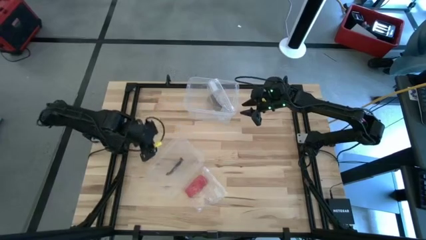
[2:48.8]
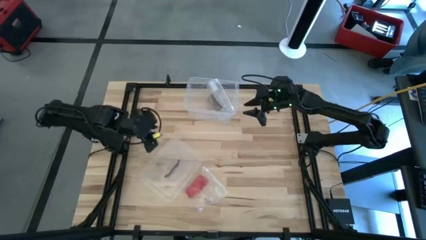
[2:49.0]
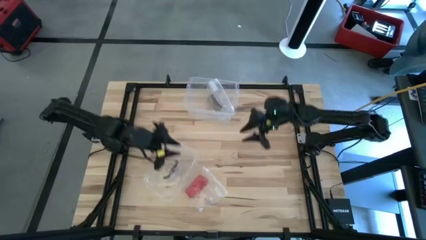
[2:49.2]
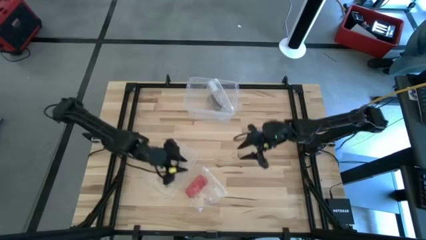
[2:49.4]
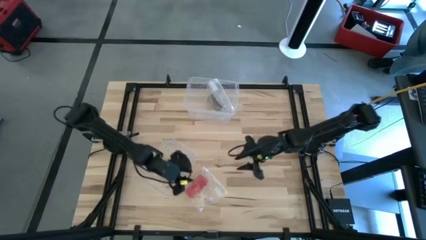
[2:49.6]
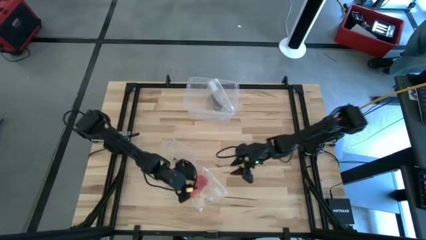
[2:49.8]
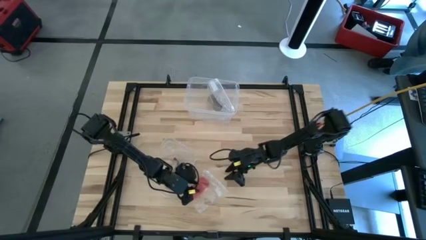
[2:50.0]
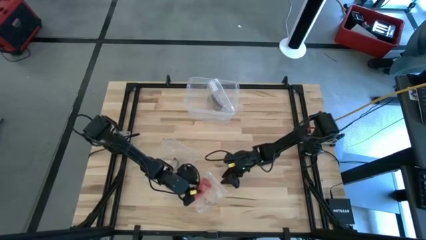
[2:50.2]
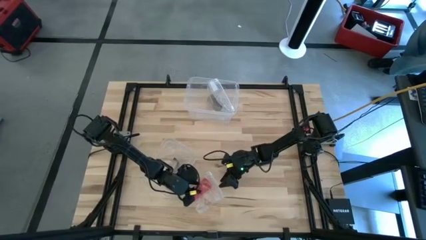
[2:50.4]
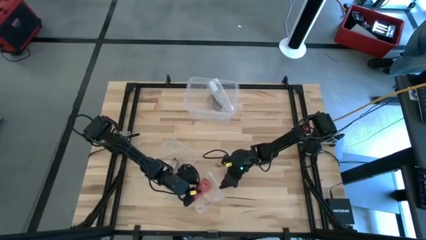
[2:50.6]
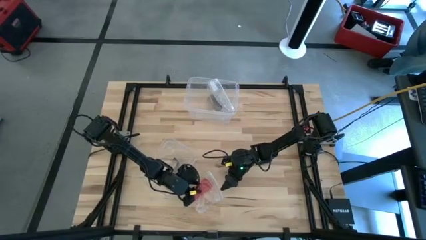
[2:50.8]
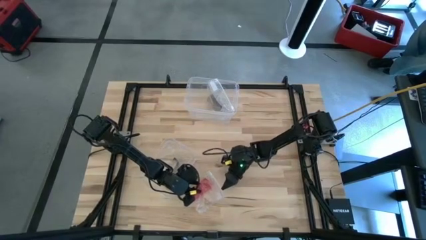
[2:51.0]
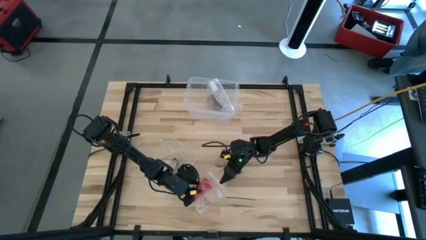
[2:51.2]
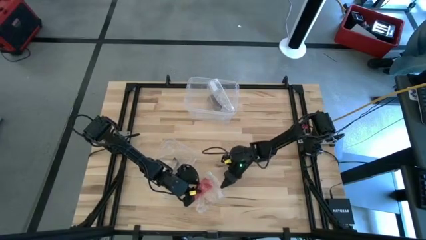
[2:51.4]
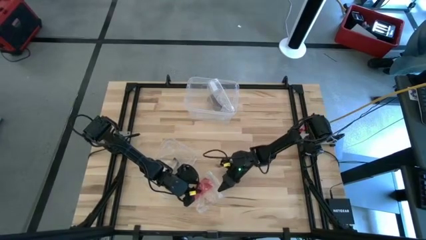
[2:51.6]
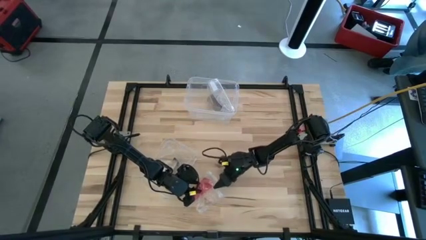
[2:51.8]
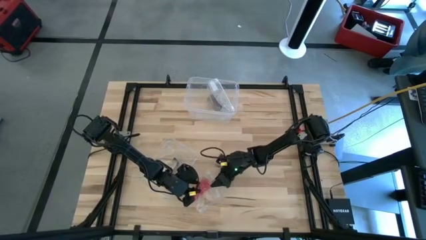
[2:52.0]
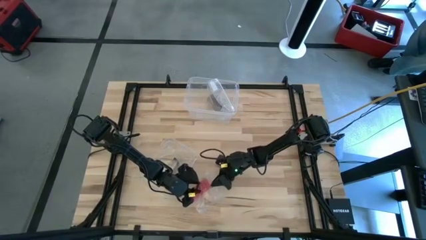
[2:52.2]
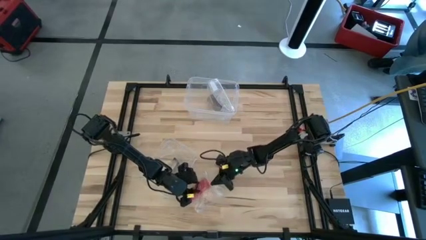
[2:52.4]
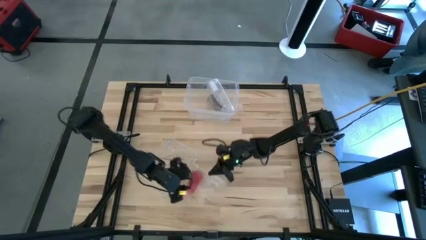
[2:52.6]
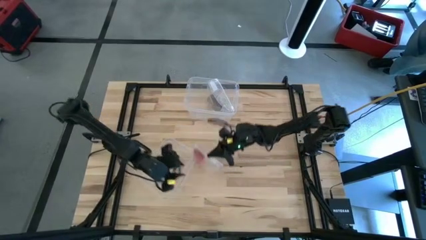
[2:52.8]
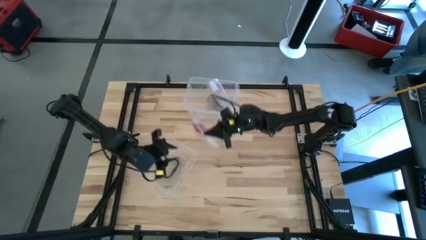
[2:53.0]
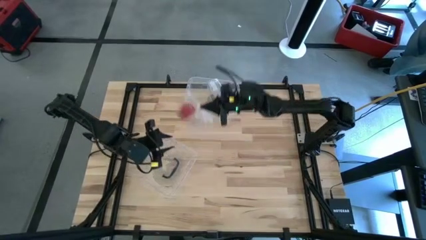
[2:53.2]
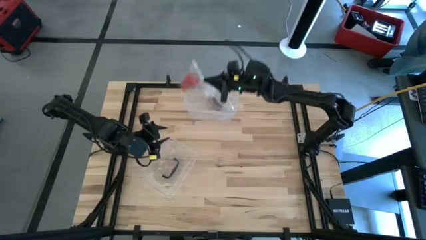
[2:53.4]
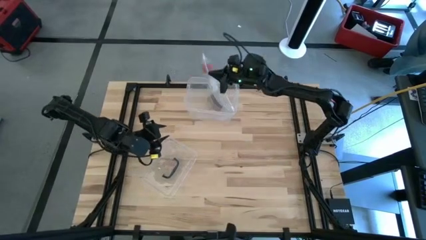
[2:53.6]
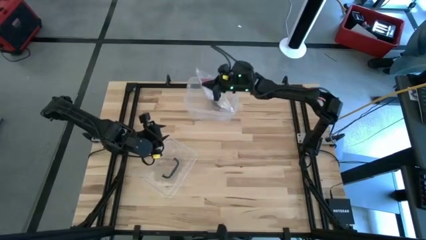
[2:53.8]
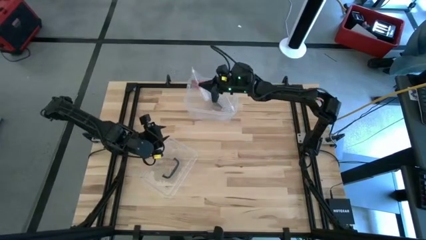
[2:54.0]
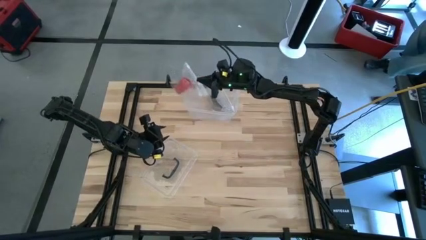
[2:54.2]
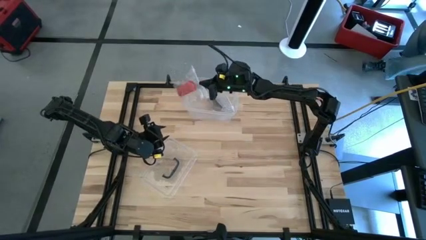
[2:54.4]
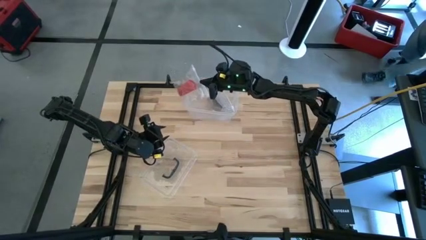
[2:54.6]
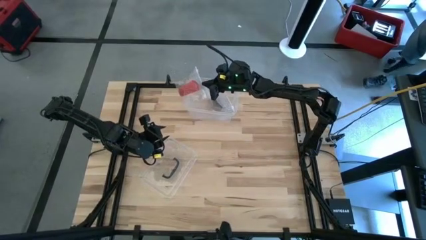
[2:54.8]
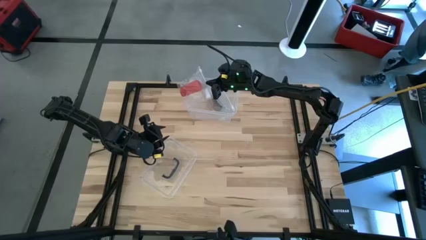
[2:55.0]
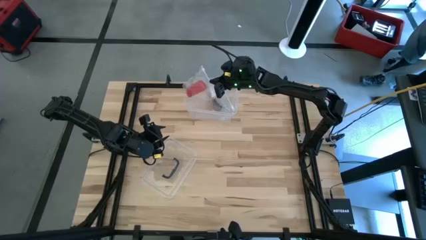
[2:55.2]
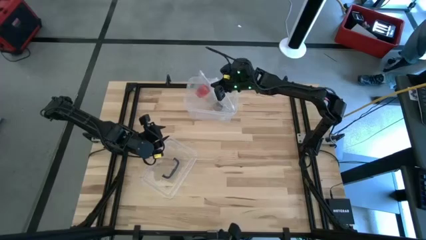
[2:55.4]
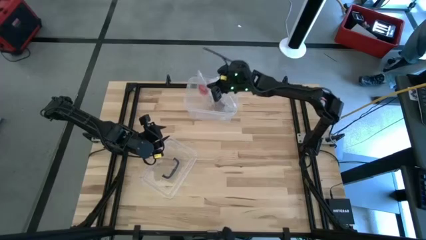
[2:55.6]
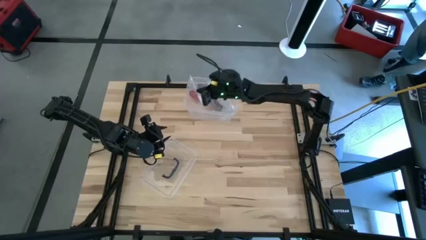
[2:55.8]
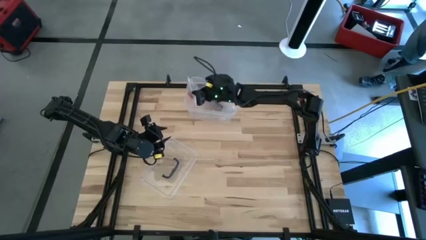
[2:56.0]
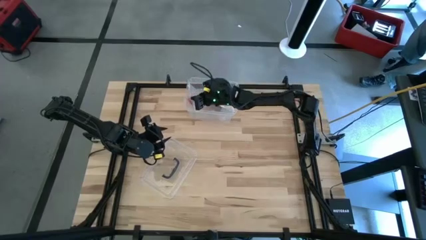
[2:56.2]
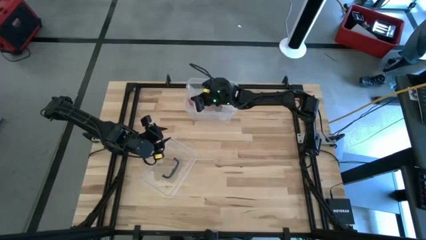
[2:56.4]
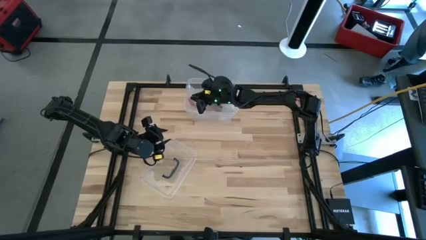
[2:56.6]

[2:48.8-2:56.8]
Task: Roll bandage
Put the transparent zip bag into the container

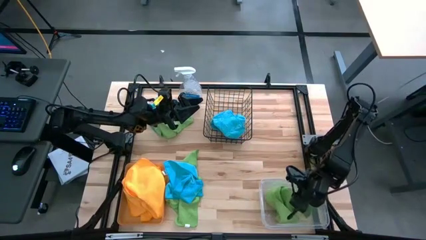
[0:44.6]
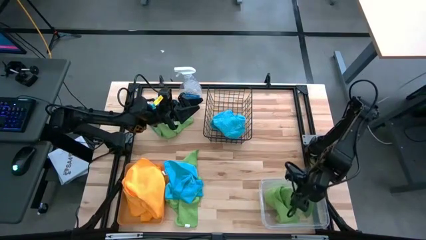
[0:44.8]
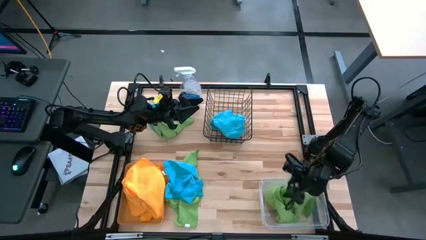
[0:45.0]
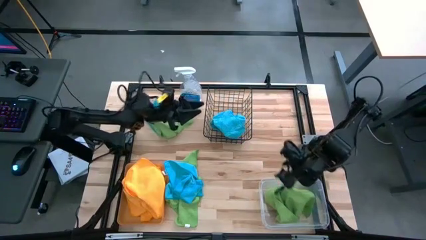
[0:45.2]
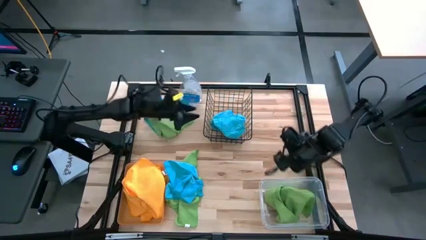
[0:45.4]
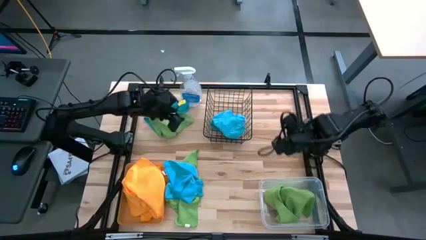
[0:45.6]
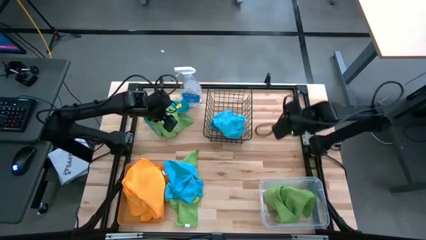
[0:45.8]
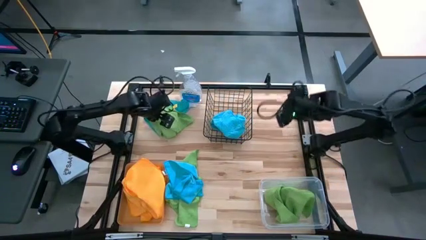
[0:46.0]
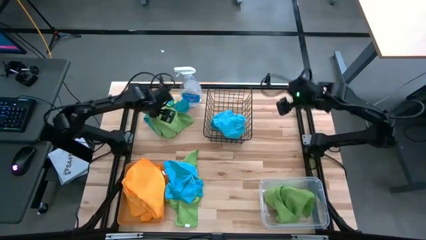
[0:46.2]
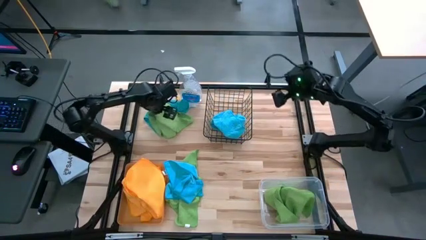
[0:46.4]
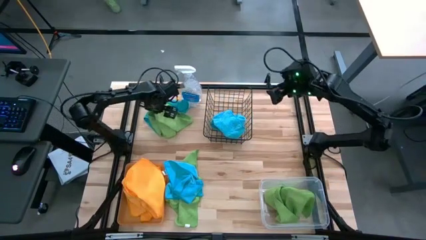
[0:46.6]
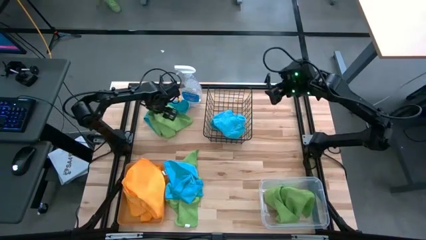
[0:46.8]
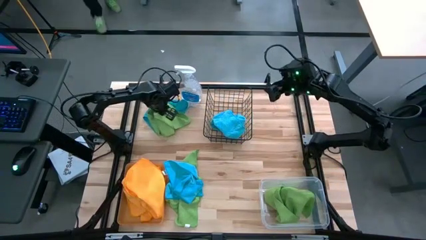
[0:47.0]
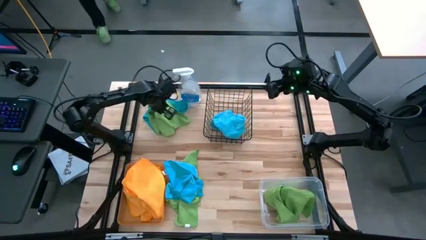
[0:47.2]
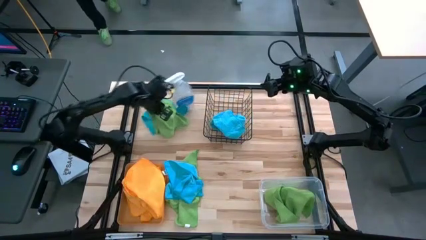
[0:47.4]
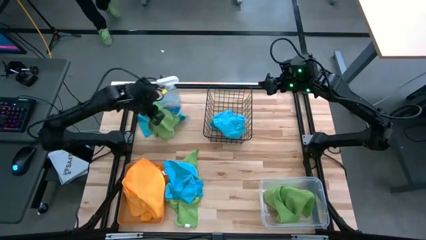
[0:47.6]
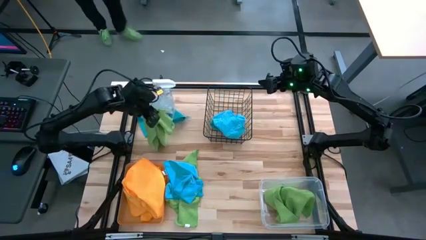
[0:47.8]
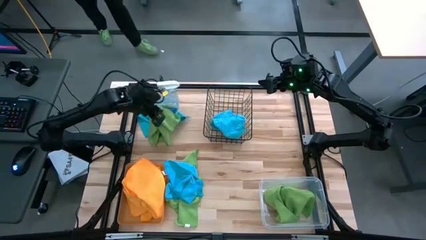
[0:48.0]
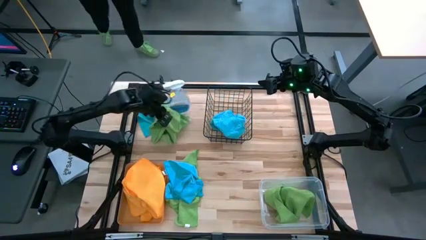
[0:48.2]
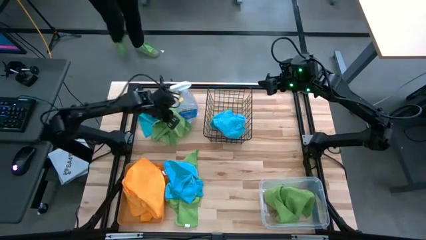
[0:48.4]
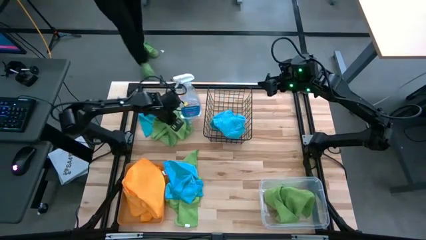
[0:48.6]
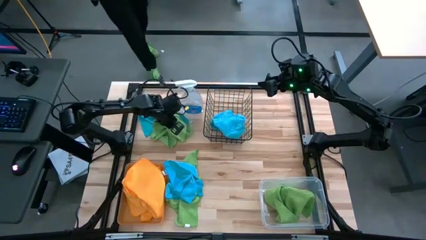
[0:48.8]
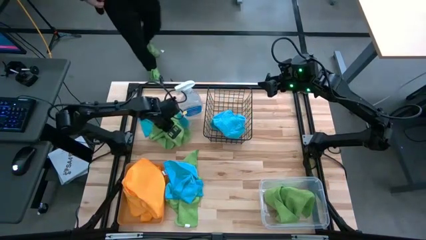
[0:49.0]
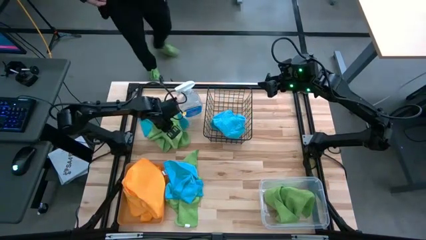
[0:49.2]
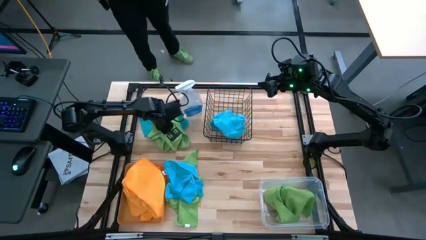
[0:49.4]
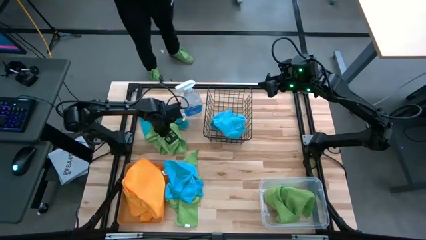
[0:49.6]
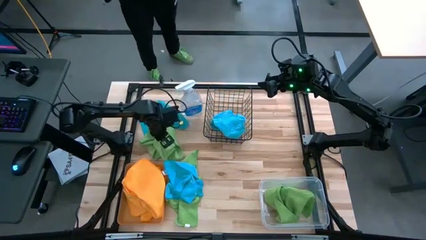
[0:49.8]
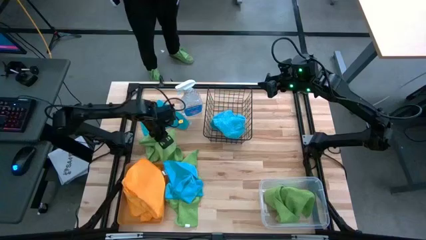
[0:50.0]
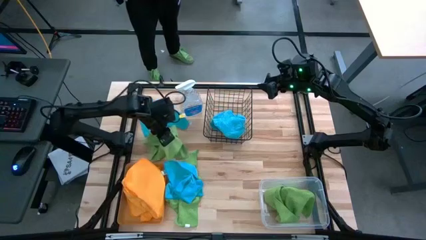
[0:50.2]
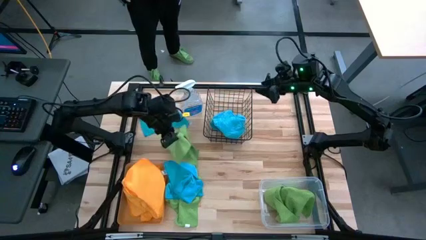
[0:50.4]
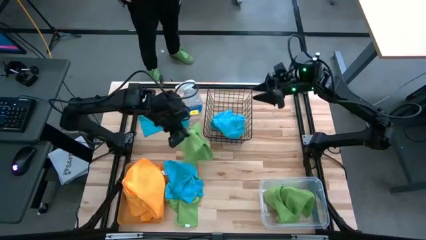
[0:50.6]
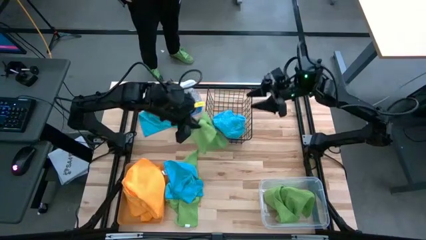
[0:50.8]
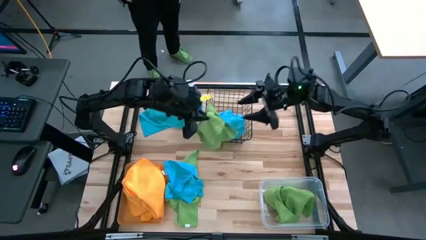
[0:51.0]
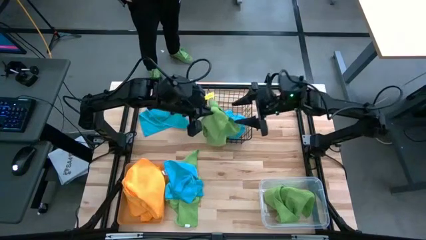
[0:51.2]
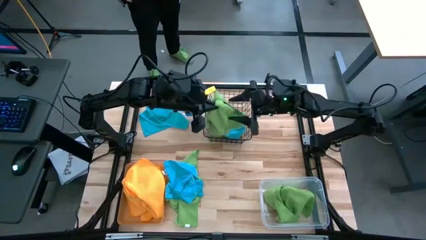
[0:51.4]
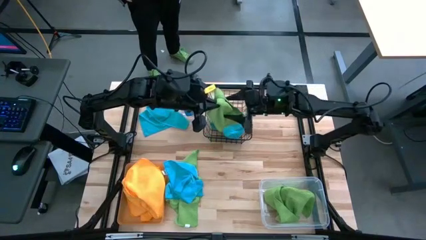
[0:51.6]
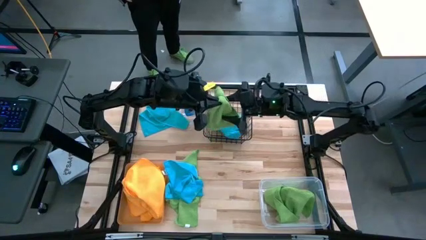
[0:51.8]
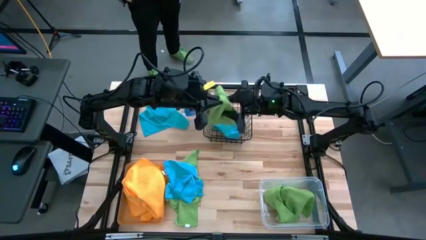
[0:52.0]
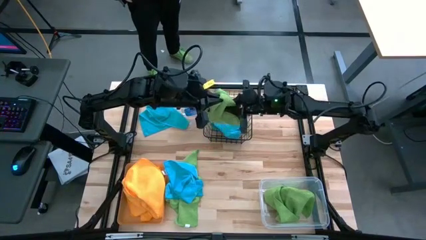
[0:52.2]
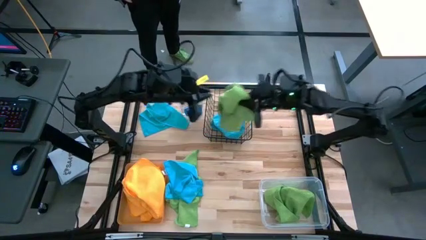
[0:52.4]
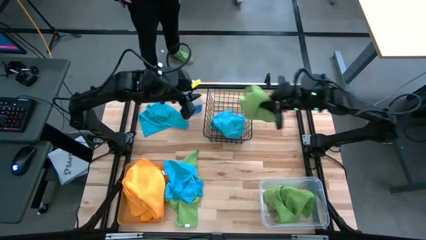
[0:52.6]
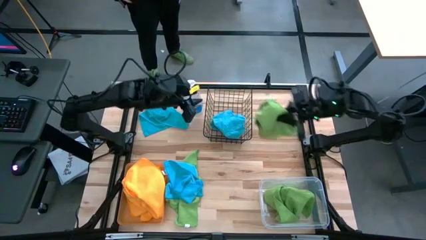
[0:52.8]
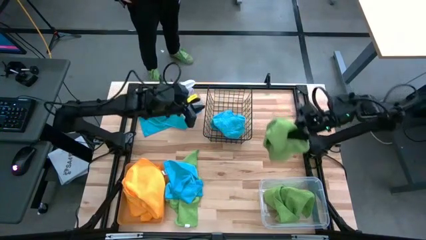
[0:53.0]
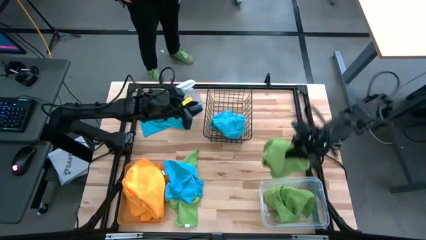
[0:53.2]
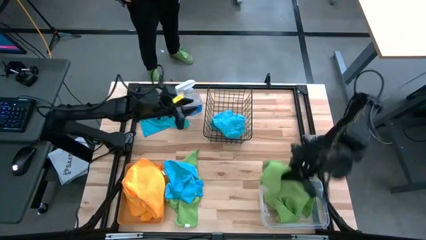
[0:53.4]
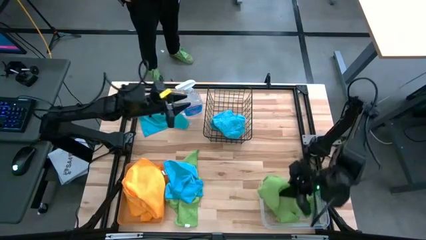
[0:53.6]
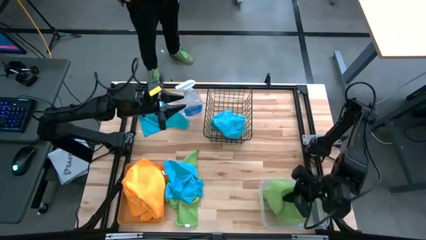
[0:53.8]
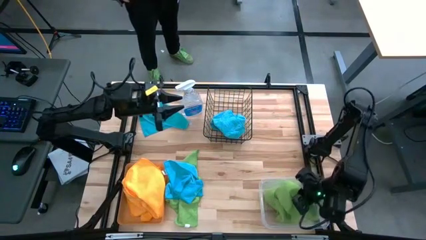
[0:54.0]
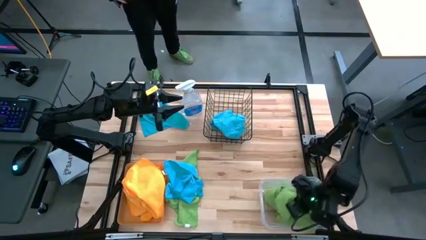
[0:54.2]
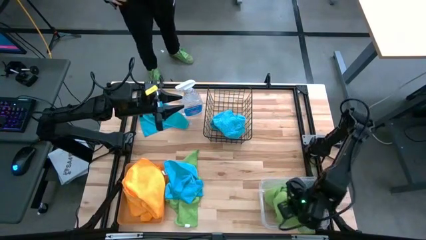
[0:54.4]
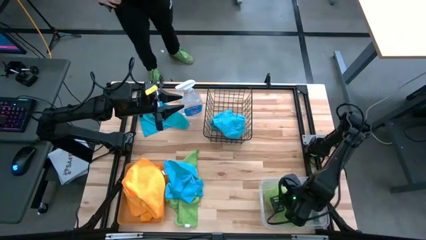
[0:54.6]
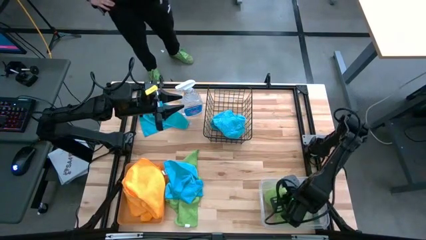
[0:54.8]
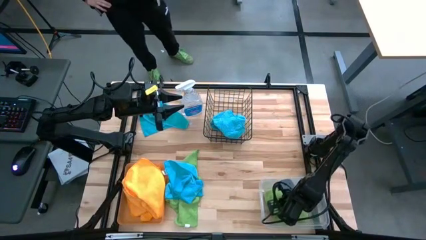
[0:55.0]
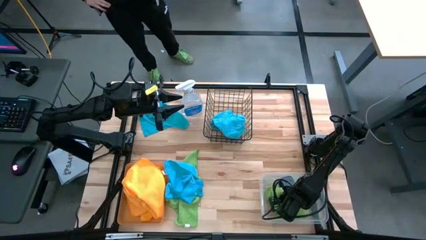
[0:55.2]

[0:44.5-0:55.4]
Task: Sort microfiber towel by color & place in baskets
Put the top green towel into the transparent bin
